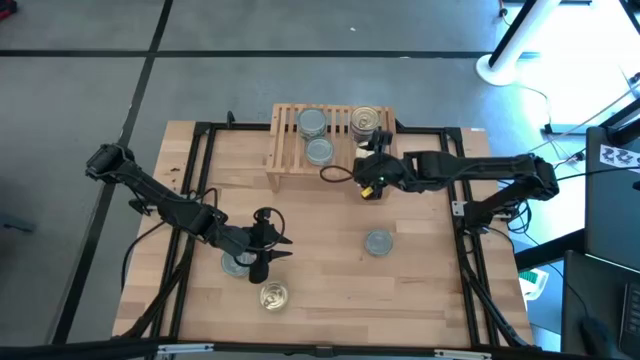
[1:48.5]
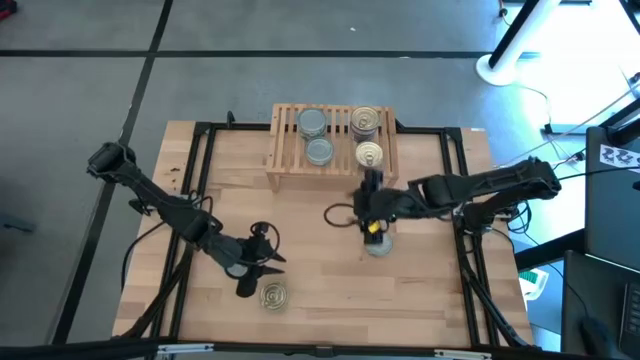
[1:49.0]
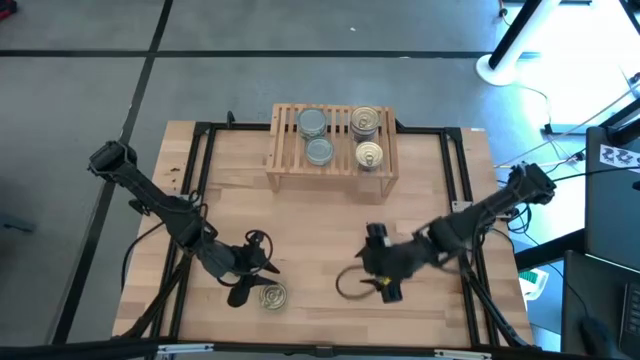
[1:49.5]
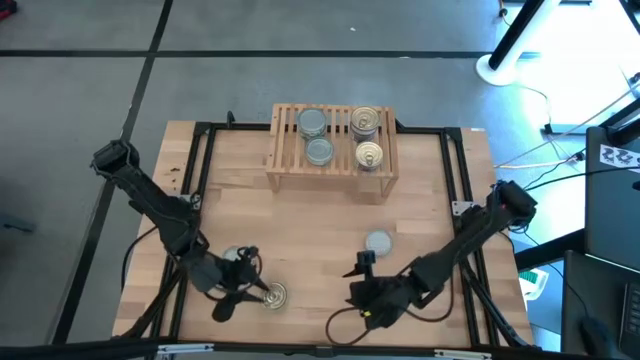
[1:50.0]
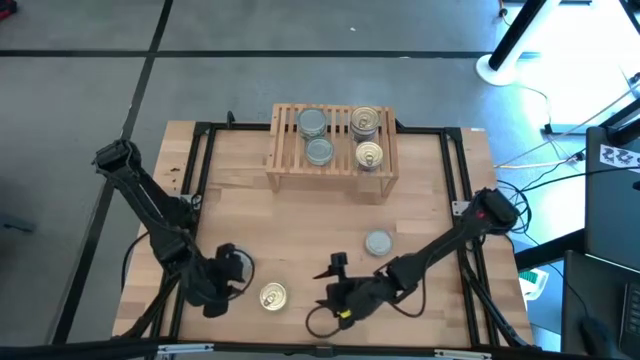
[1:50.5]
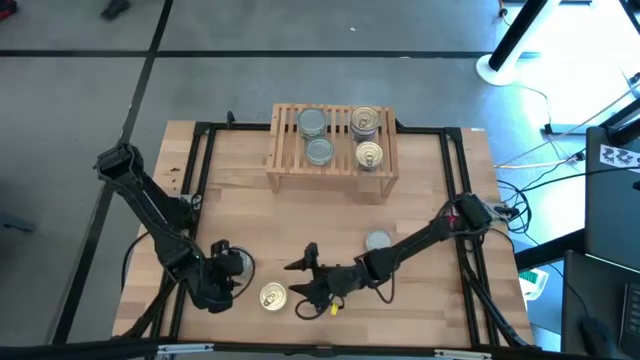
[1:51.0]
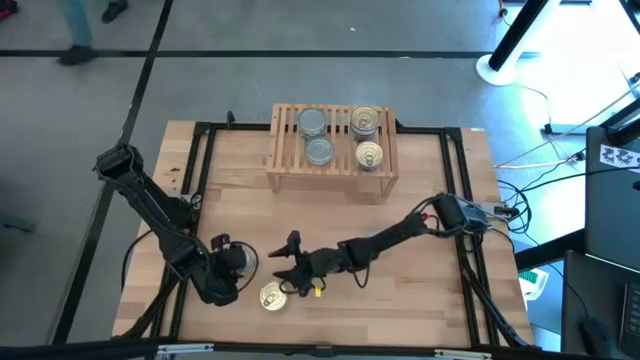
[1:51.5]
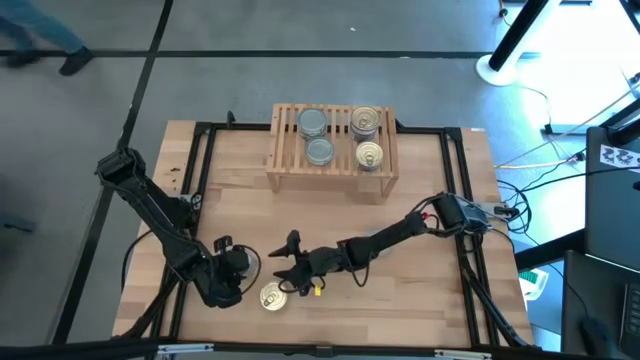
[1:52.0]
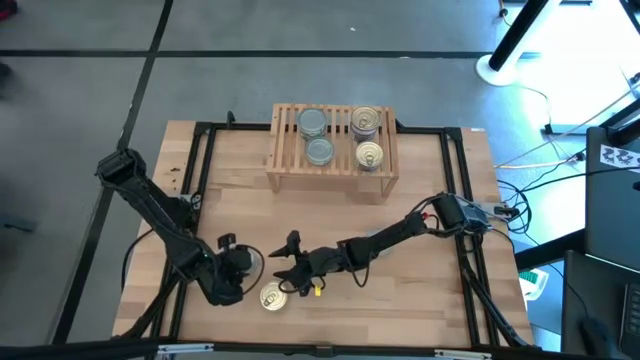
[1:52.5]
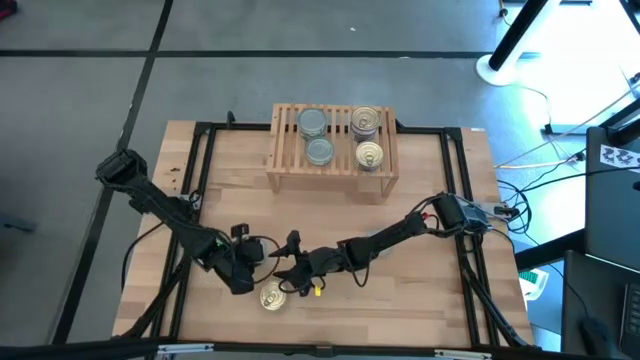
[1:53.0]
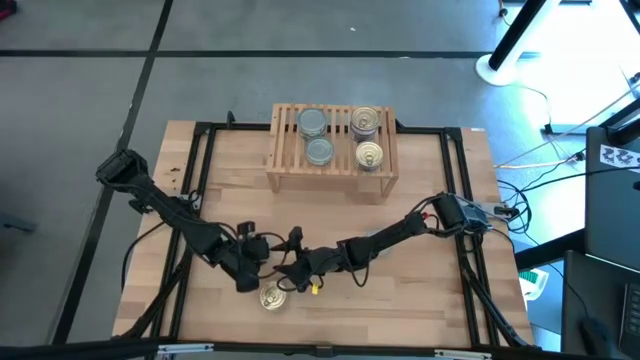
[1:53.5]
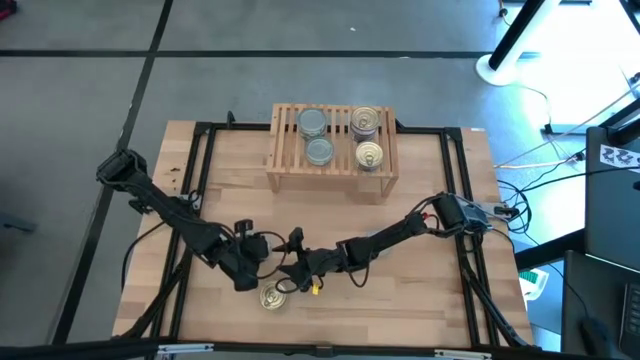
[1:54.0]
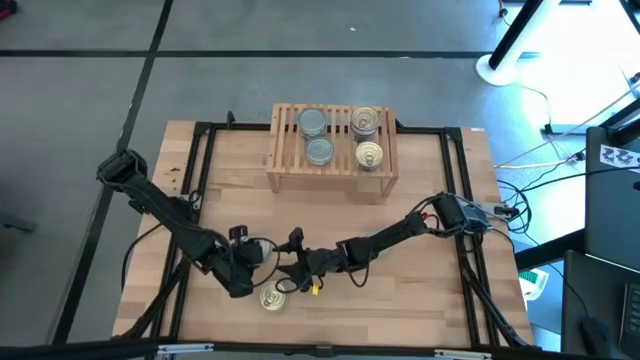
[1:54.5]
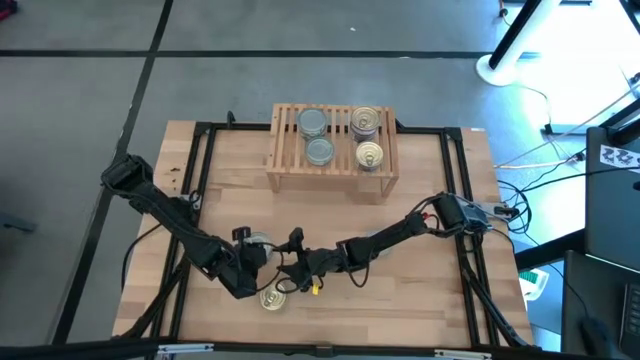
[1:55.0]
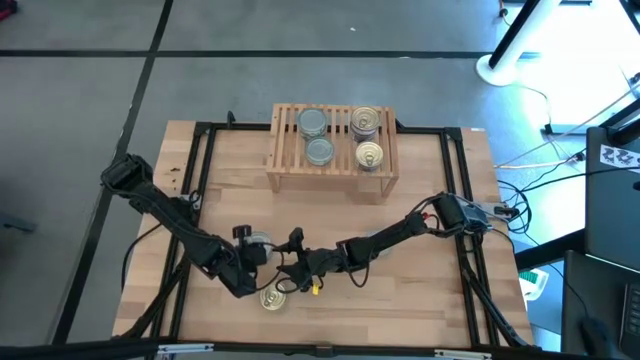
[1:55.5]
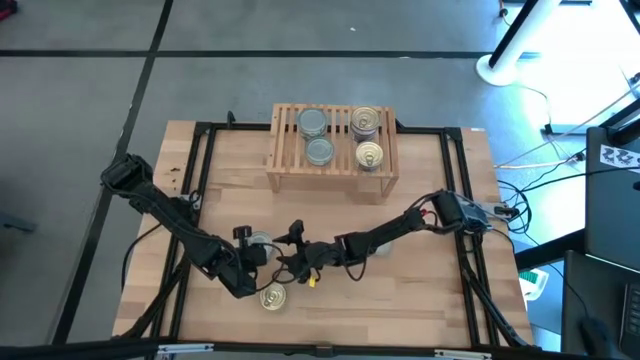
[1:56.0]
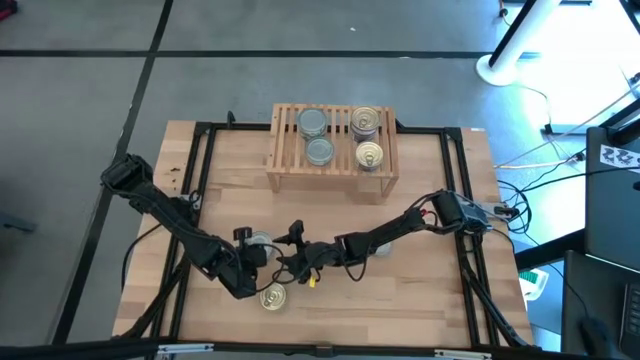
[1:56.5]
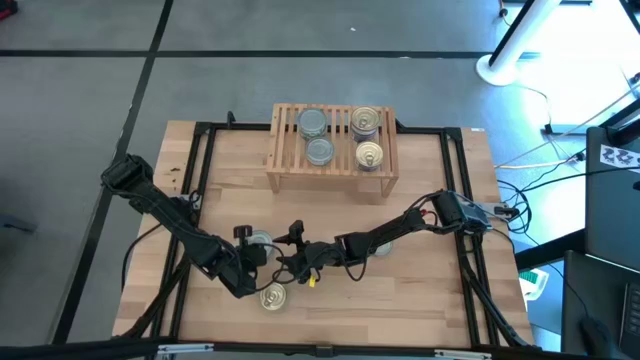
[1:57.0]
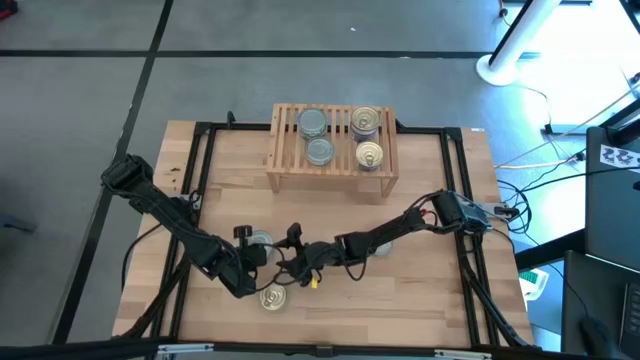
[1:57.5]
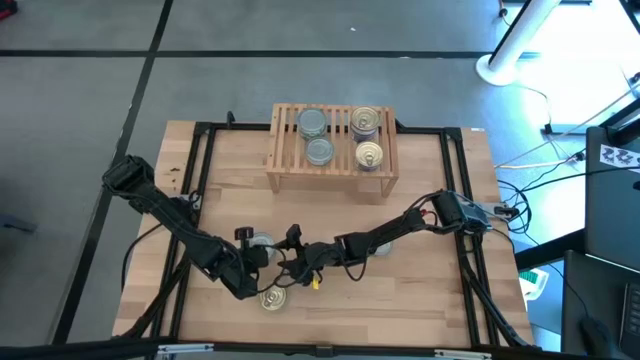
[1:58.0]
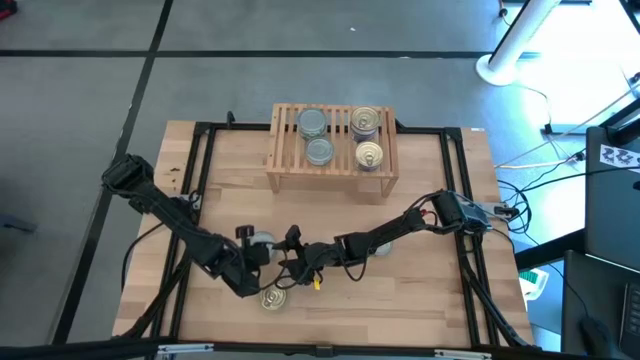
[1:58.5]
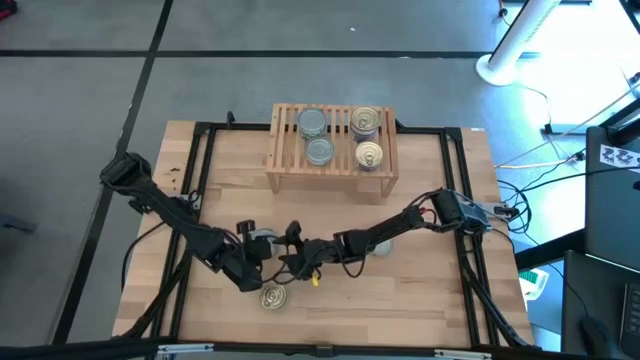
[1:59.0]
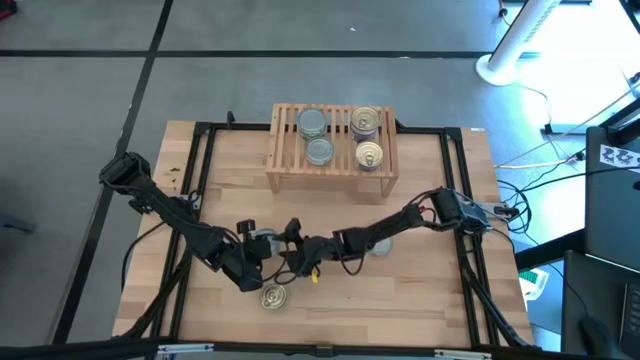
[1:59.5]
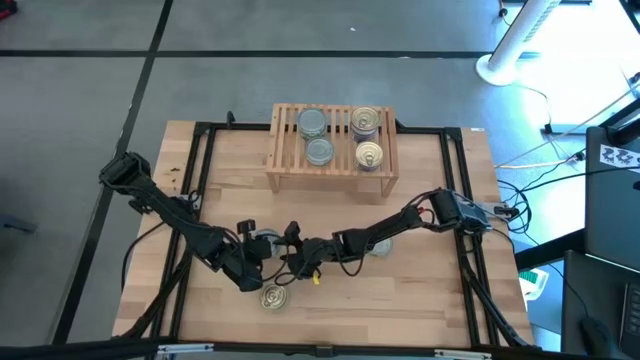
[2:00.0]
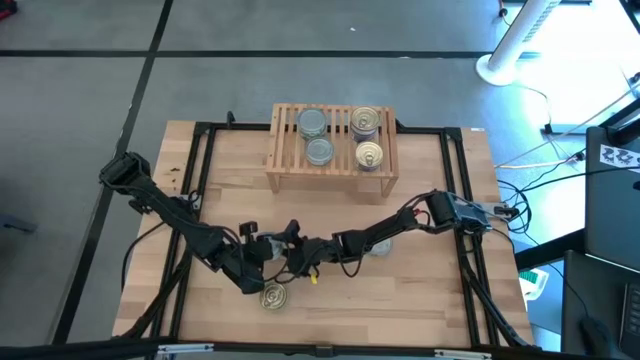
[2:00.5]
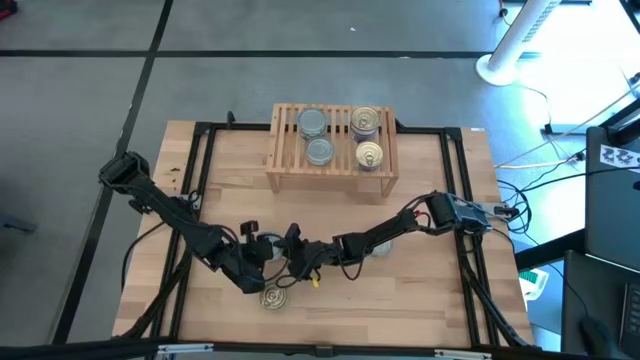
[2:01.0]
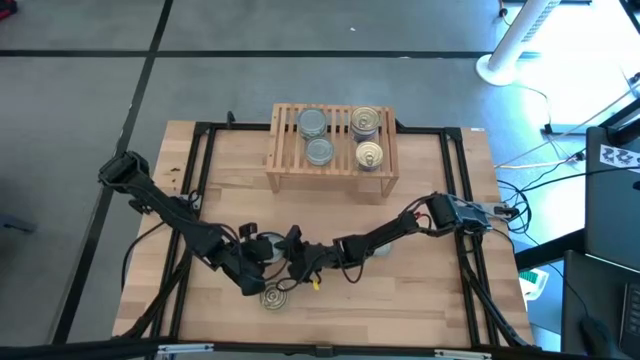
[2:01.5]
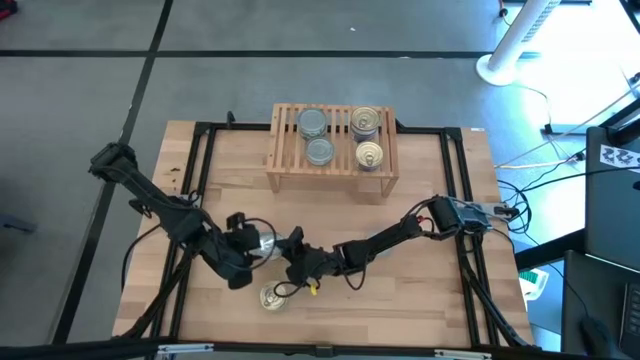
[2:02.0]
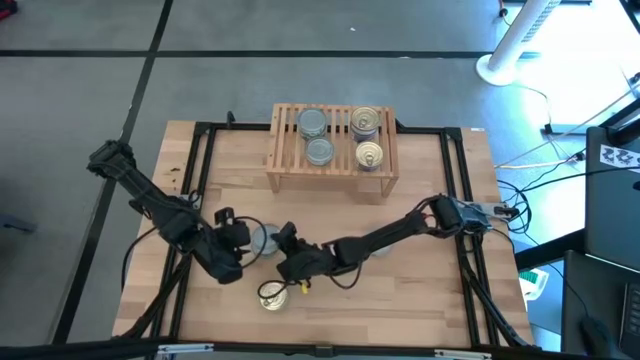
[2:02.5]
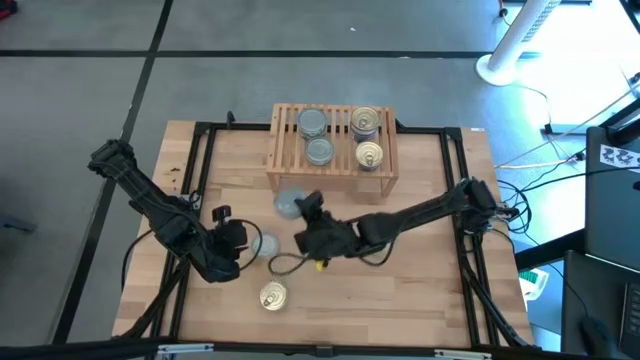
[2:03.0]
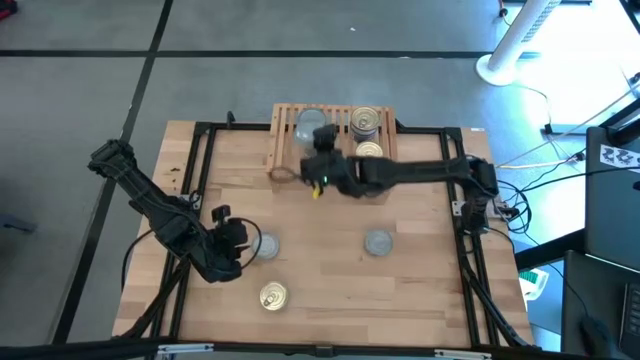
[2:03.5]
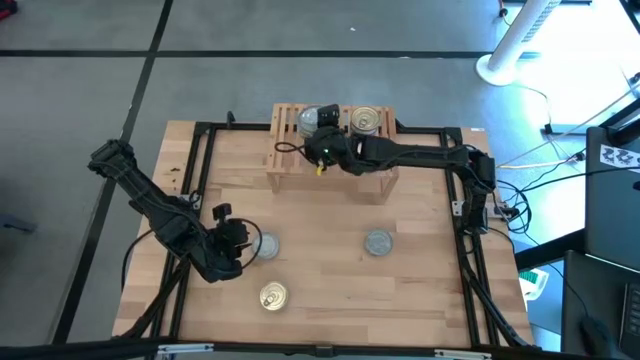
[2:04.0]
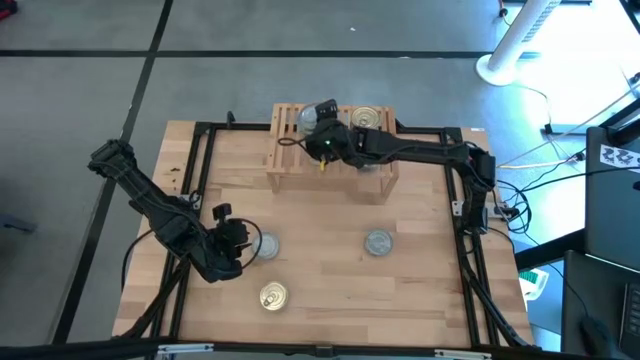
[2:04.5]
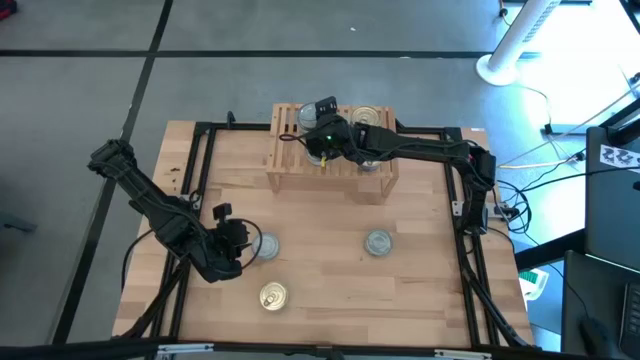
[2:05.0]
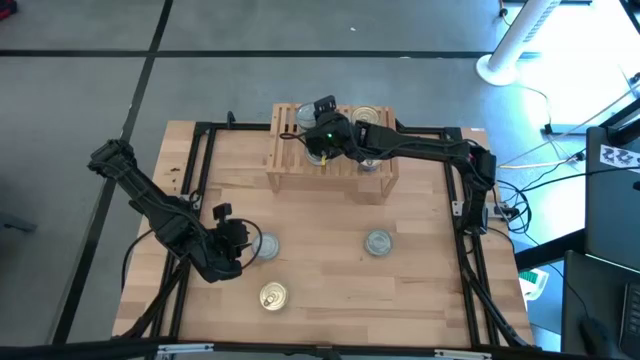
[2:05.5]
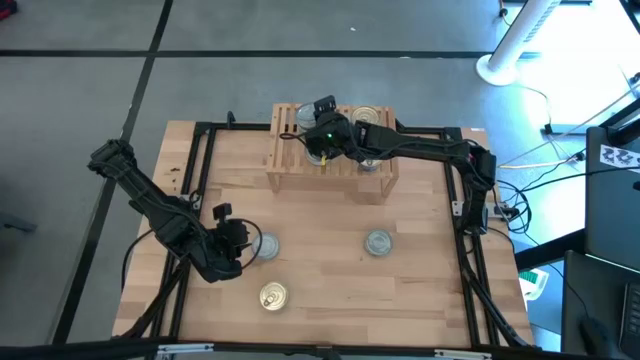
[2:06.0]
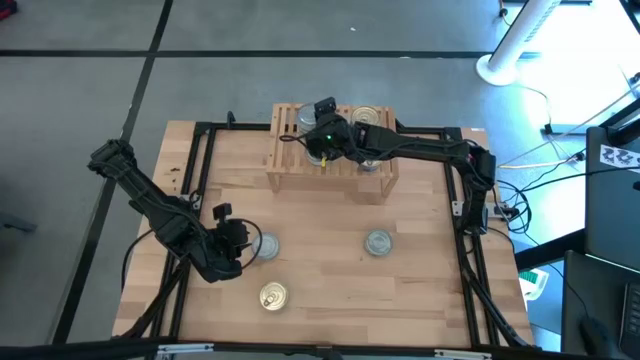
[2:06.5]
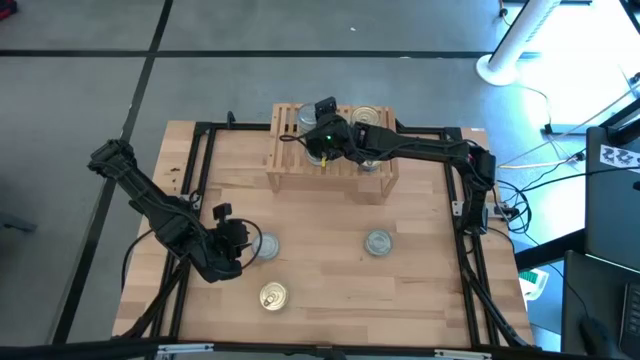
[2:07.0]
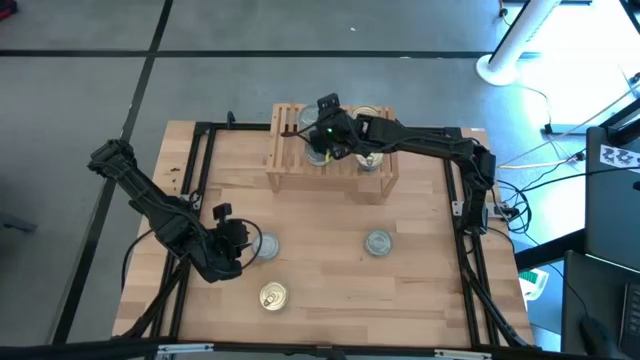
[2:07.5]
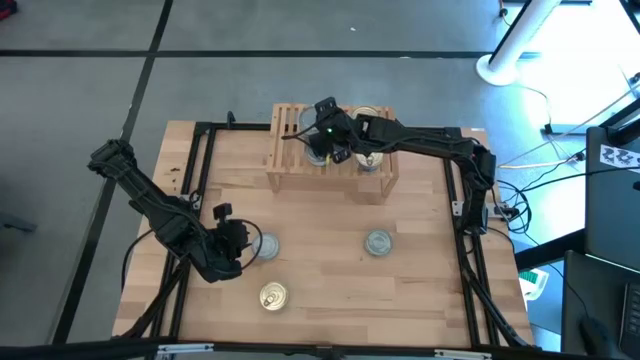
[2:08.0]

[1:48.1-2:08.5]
Task: Stack canned seafood by type on shelf
Stack the green white tuna can on top of the green white tuna can on the shelf
